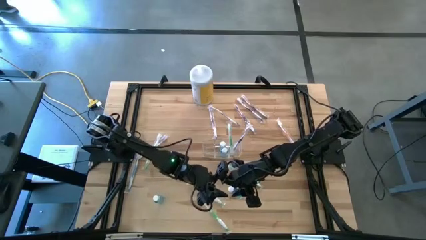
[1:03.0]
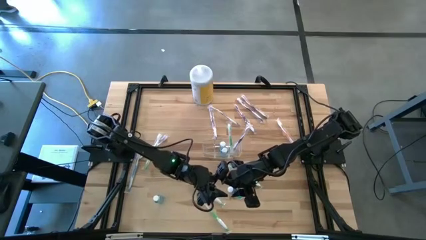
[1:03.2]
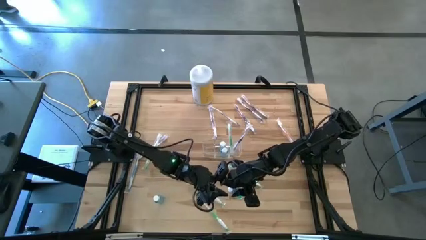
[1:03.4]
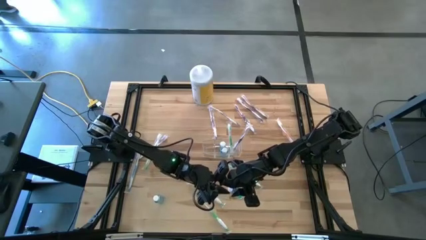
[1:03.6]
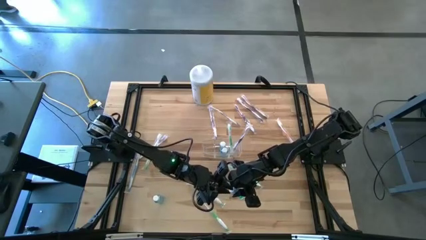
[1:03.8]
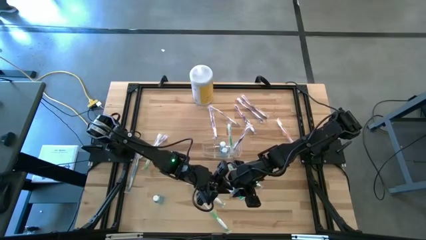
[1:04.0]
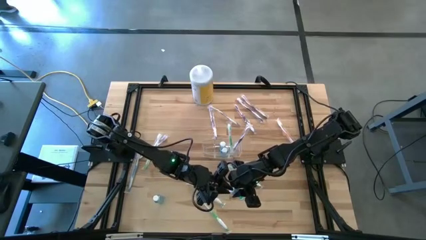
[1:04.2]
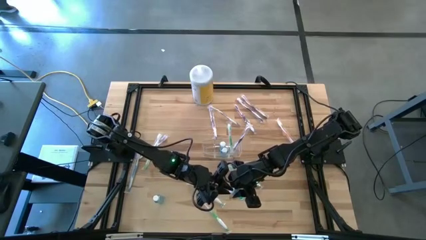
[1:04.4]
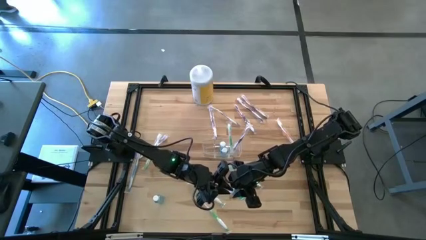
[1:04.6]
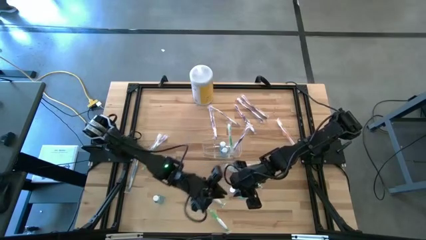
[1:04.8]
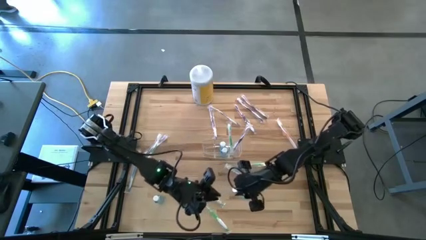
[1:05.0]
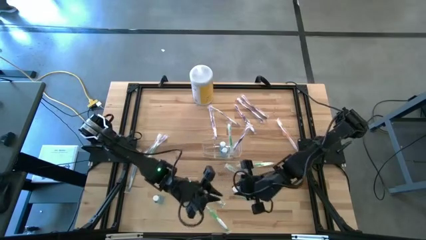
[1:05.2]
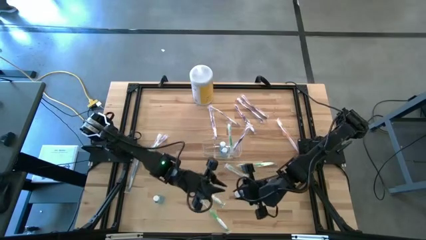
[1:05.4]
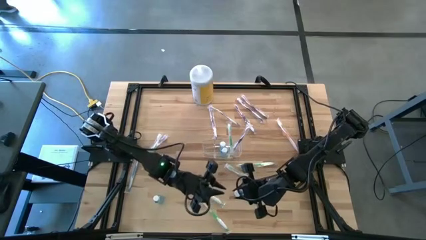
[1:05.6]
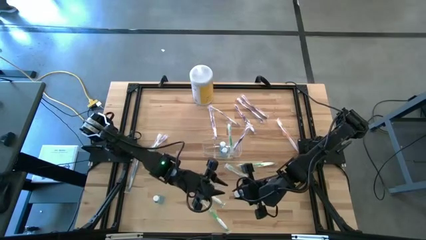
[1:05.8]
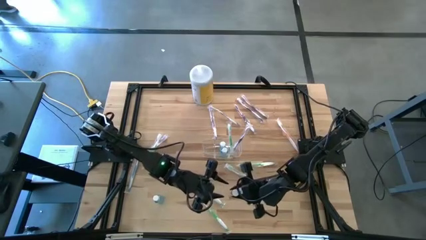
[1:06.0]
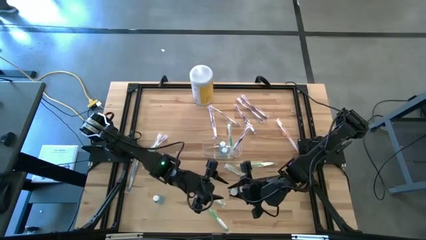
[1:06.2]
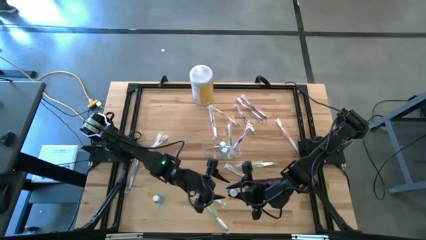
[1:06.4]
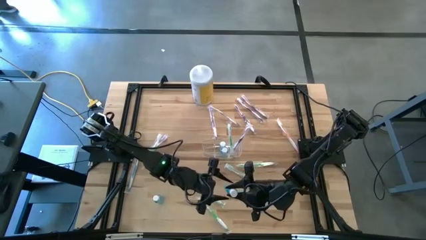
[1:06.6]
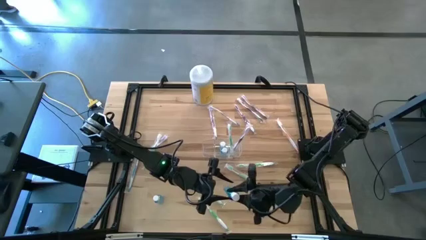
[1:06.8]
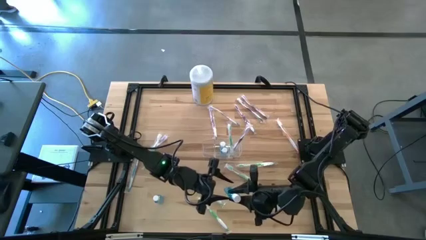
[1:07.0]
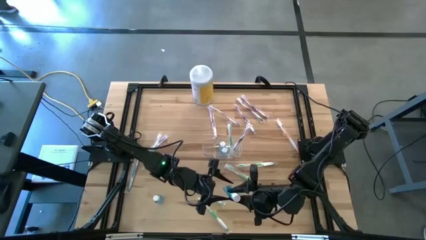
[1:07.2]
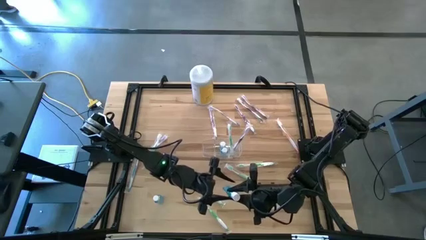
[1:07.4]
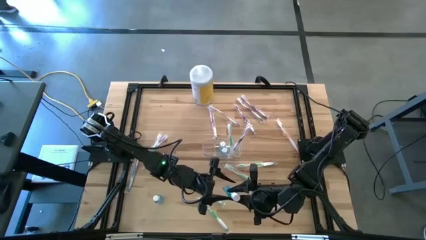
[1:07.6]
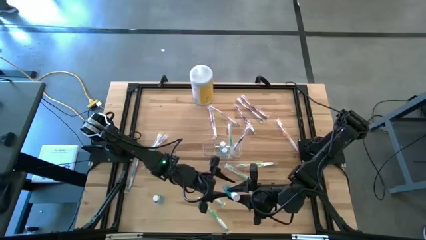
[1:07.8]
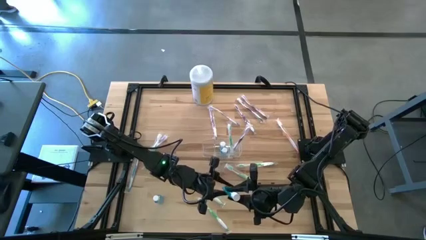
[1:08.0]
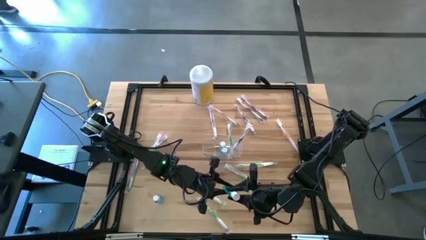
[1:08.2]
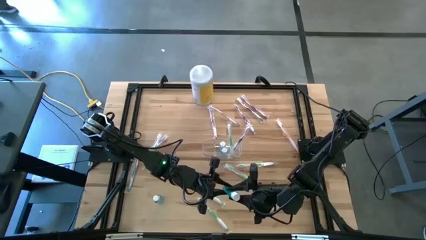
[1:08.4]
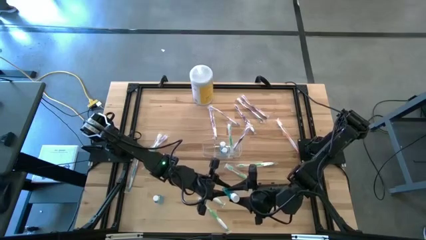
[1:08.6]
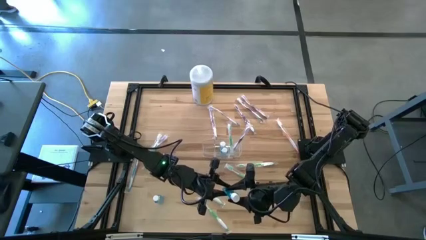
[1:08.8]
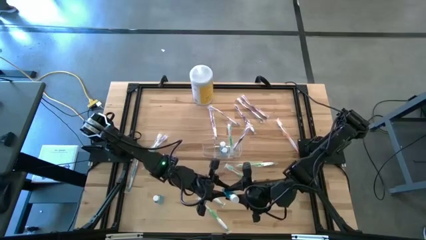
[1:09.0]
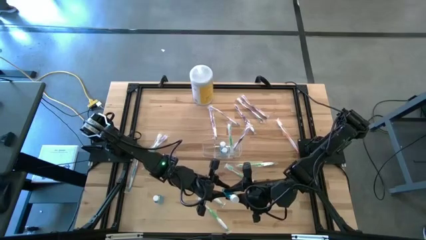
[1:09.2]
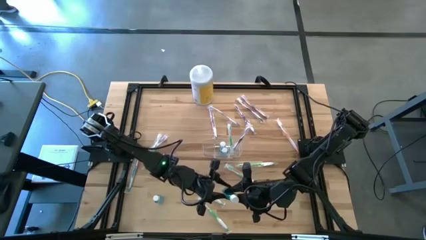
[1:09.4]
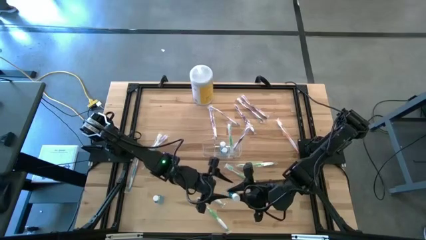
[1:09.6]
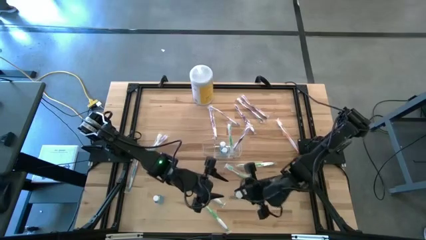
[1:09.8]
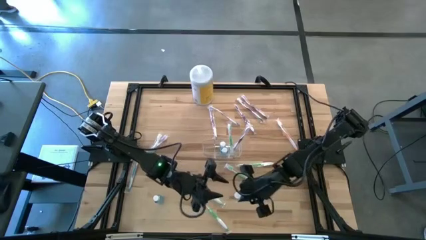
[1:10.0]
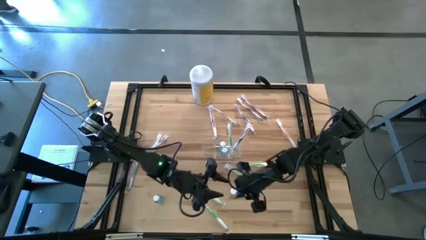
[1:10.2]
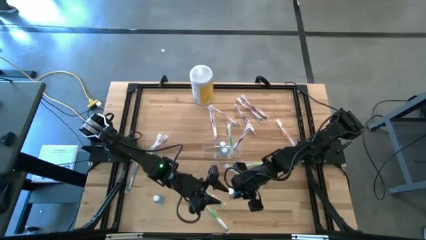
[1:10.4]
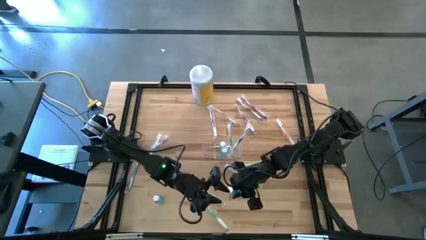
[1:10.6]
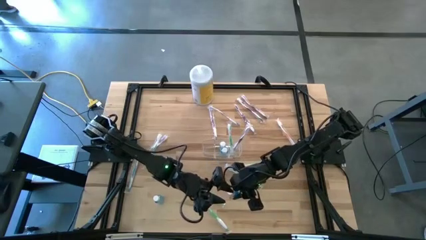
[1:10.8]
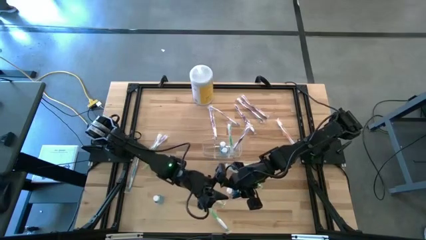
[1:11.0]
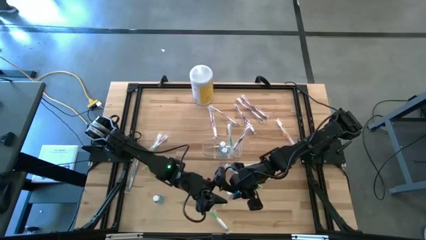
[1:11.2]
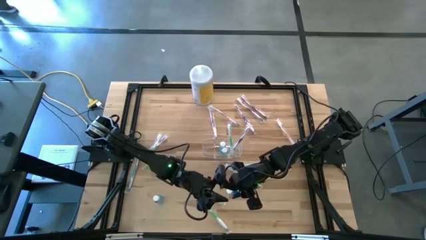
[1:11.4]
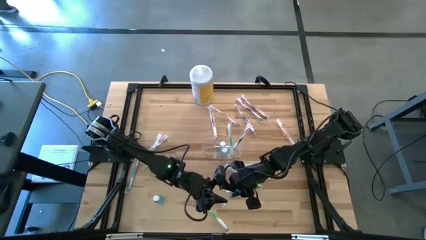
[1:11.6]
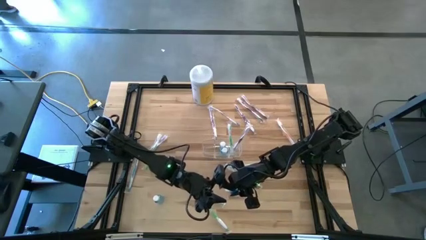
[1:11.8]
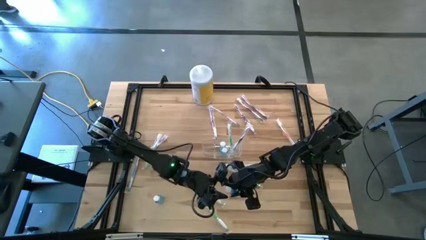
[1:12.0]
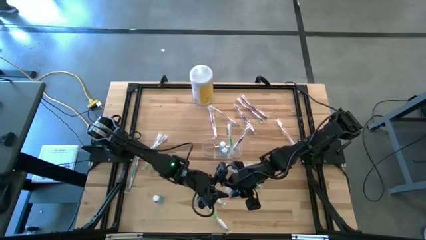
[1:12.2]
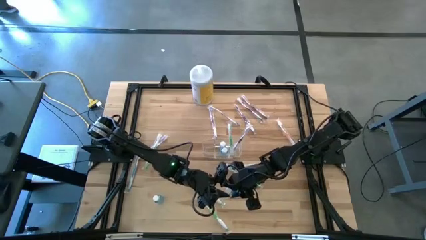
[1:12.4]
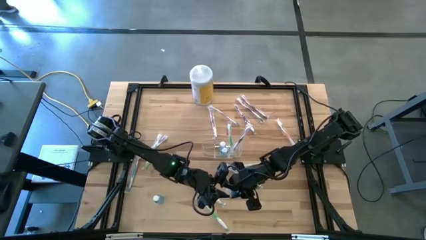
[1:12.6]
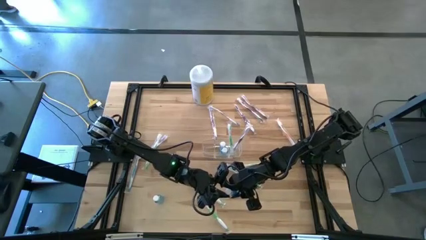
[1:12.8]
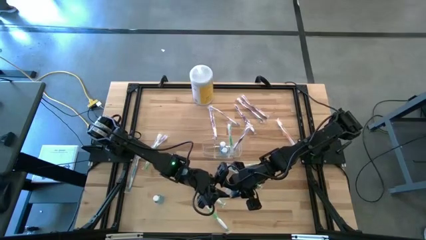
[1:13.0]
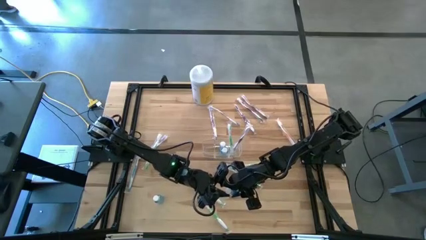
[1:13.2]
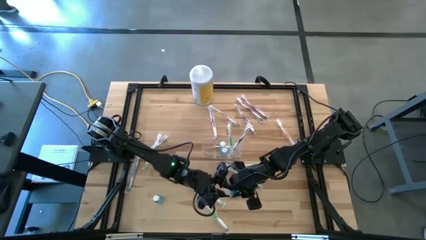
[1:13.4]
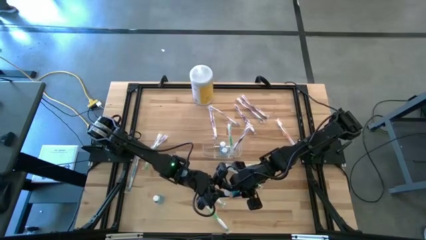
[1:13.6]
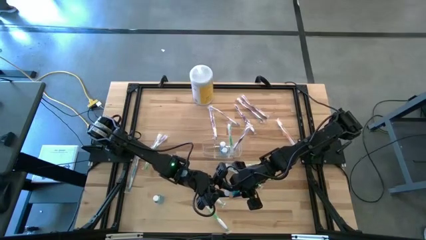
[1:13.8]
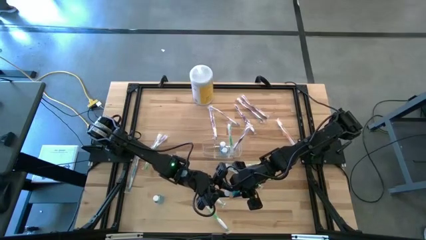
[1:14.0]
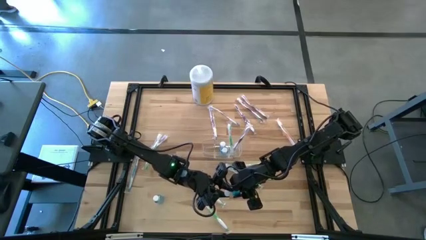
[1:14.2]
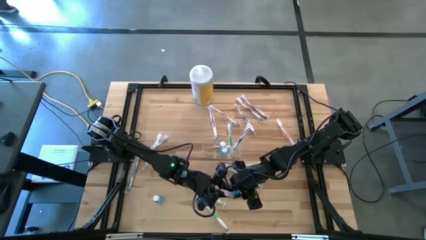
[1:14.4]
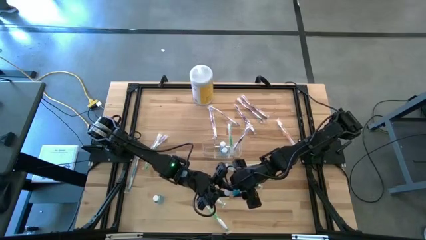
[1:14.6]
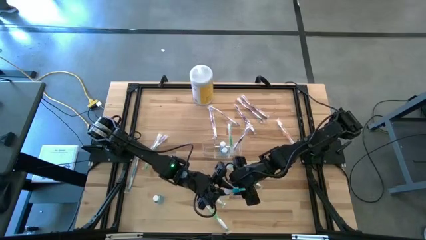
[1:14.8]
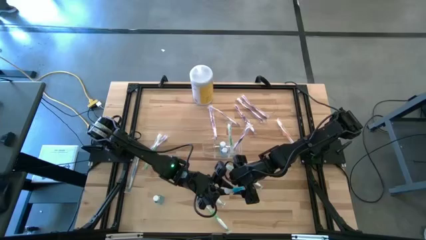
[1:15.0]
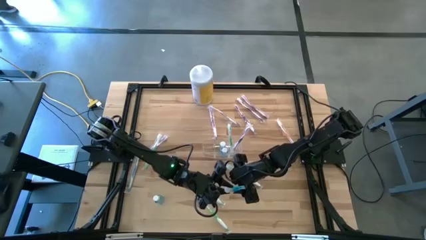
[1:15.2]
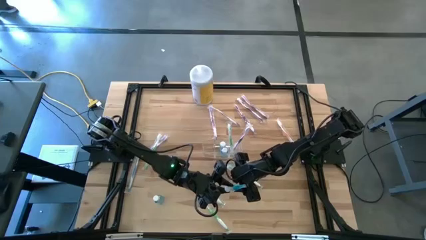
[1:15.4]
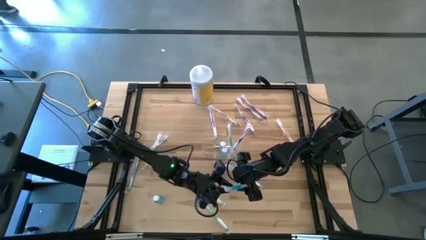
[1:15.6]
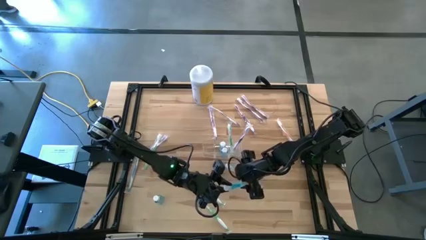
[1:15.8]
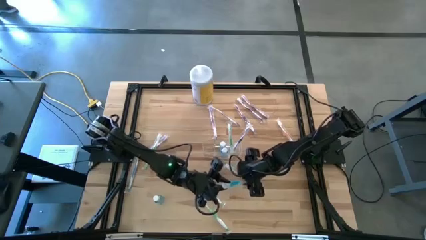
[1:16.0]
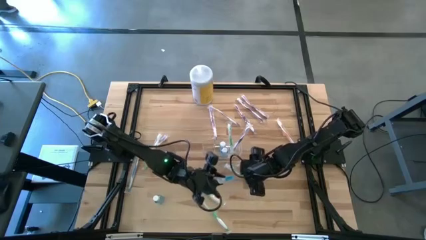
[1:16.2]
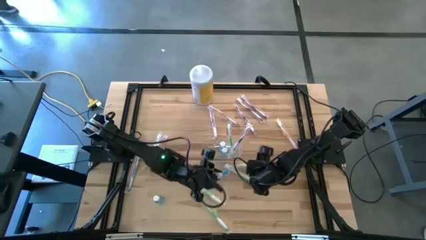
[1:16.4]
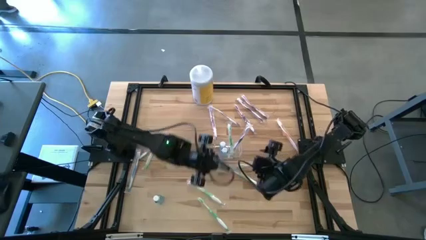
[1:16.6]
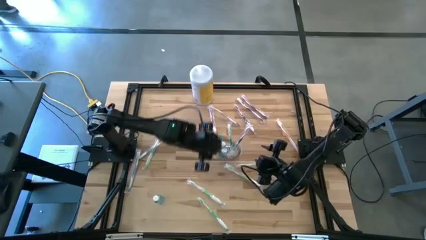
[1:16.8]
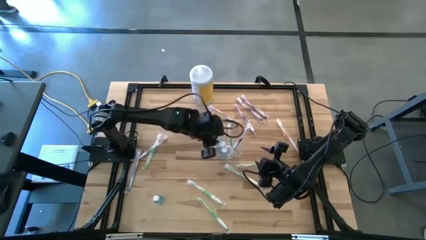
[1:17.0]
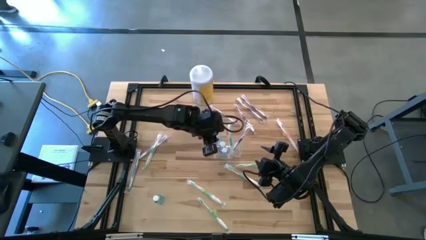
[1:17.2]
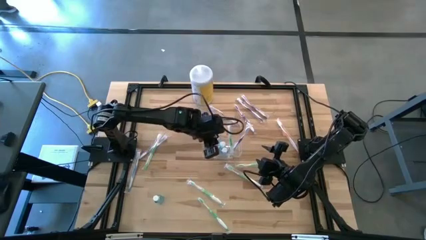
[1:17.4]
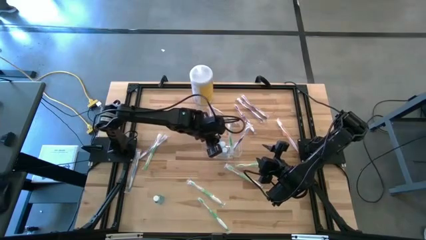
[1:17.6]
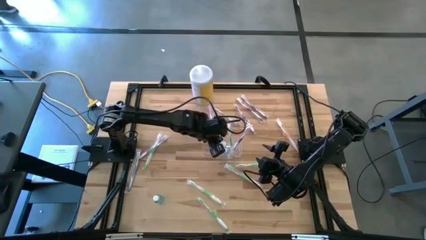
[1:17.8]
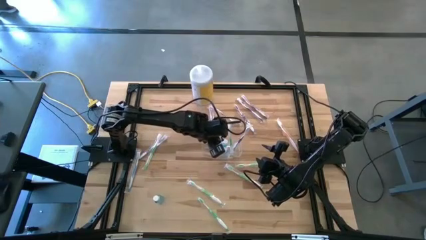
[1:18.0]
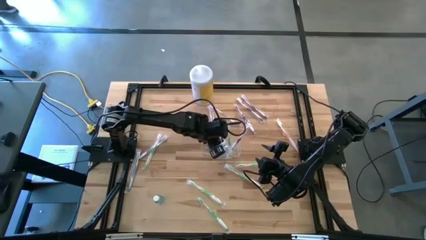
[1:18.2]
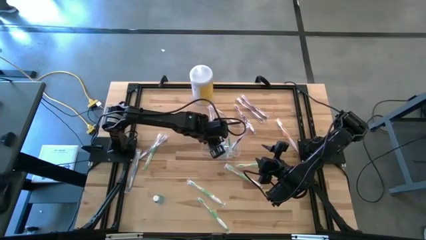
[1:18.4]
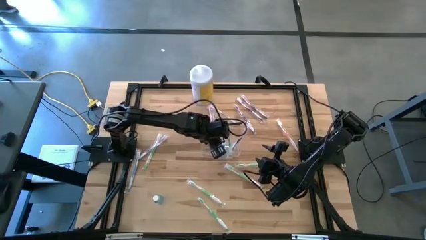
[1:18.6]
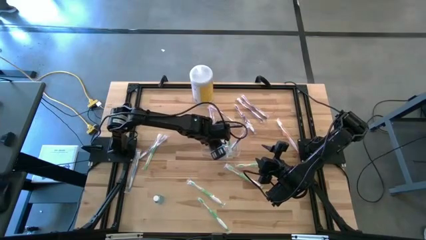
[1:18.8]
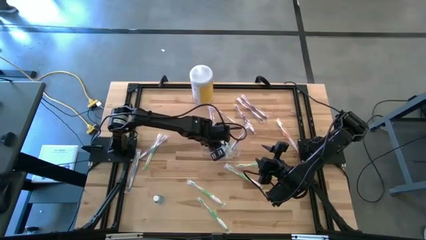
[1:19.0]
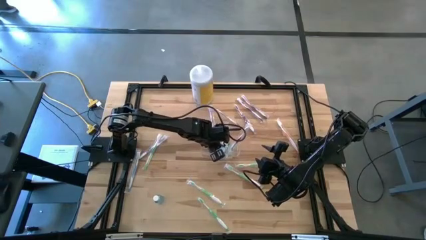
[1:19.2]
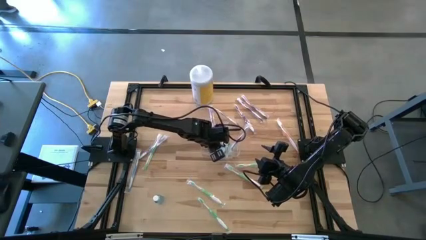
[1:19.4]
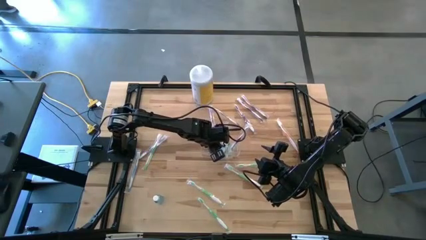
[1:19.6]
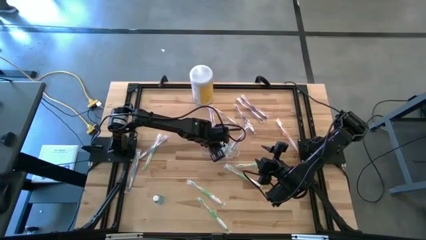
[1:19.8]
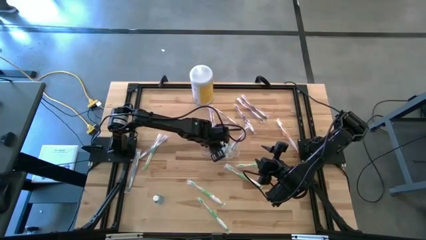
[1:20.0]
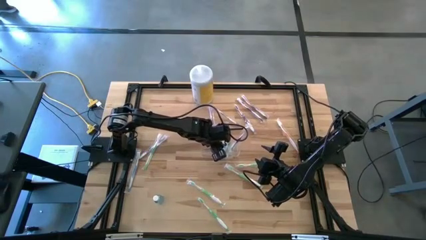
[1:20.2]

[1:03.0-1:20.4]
Task: Pick & Place toothbrushing station
Put the mouthwash bottle into the transparent organizer
